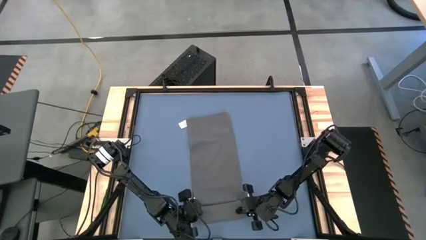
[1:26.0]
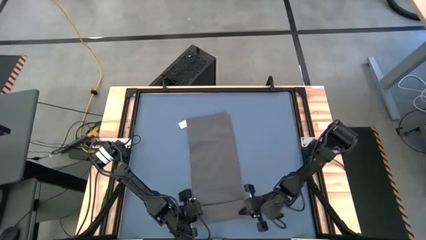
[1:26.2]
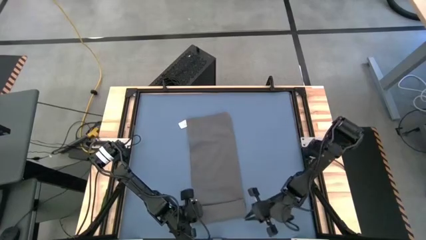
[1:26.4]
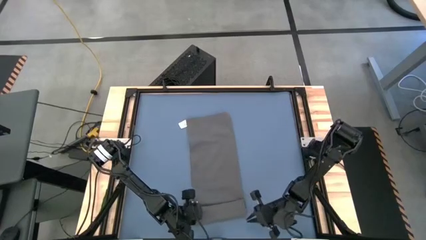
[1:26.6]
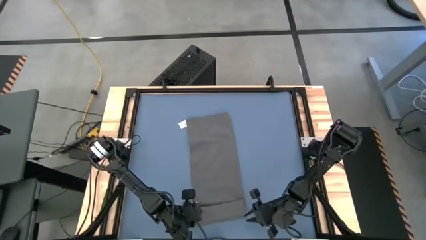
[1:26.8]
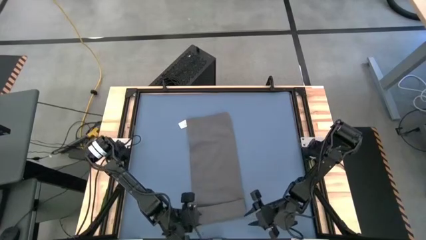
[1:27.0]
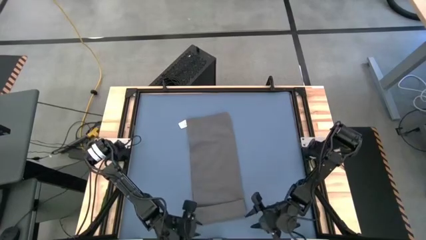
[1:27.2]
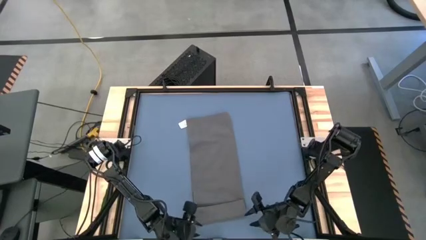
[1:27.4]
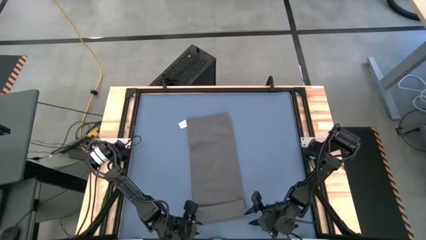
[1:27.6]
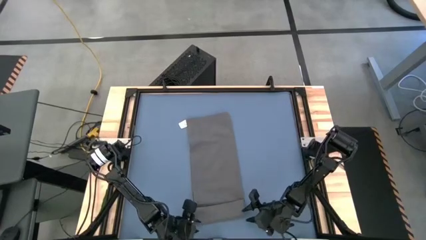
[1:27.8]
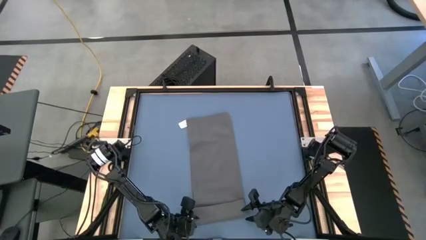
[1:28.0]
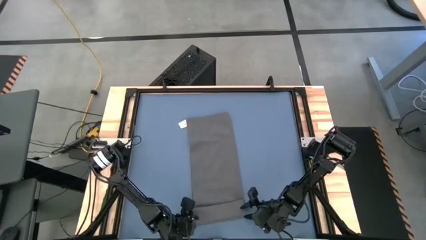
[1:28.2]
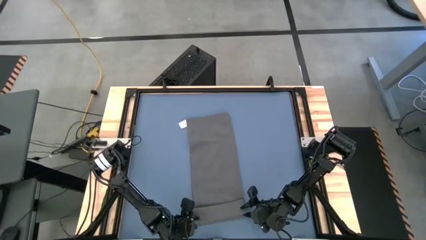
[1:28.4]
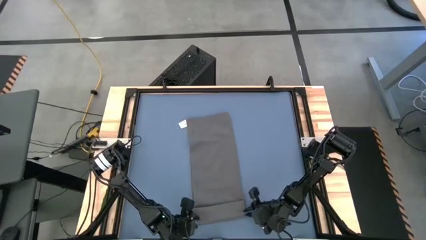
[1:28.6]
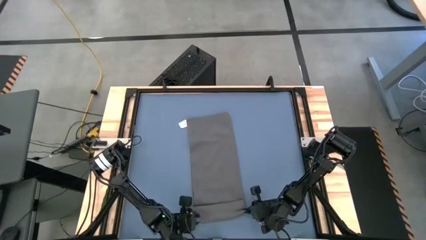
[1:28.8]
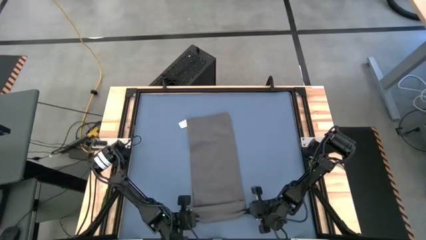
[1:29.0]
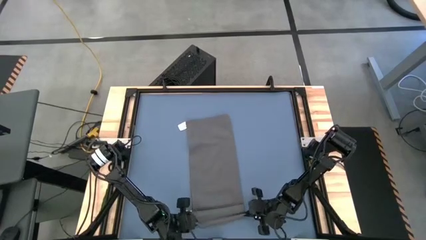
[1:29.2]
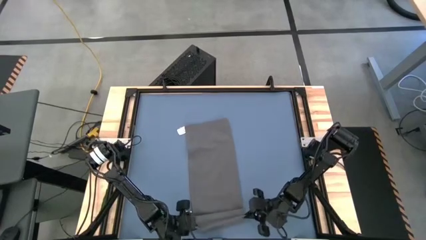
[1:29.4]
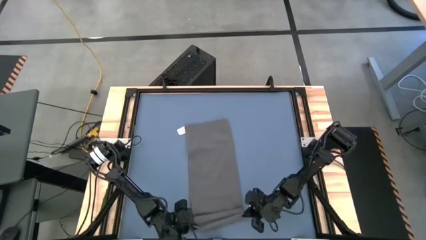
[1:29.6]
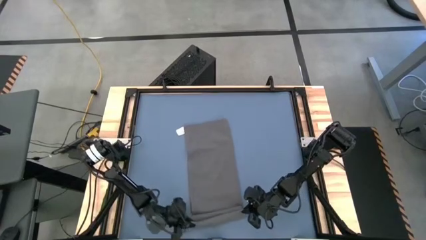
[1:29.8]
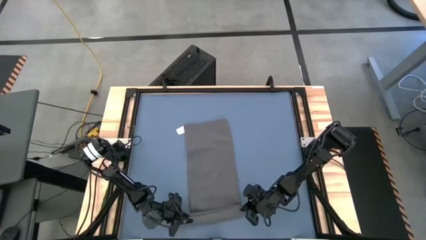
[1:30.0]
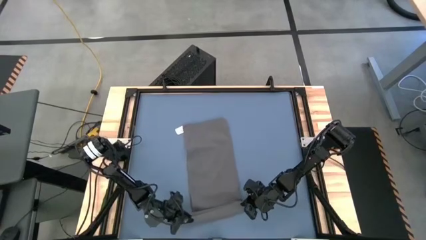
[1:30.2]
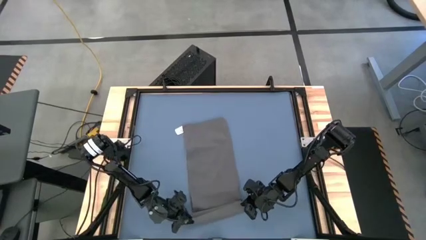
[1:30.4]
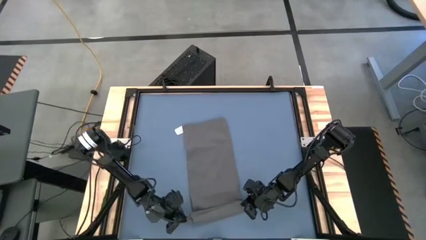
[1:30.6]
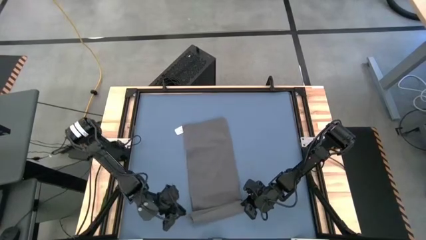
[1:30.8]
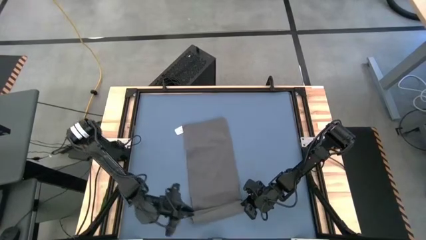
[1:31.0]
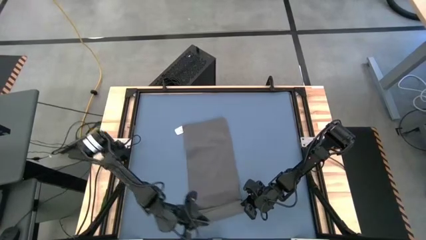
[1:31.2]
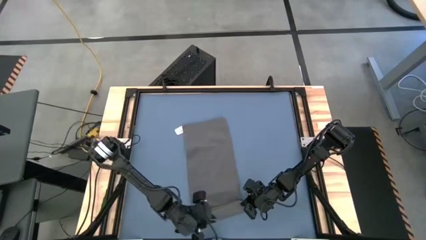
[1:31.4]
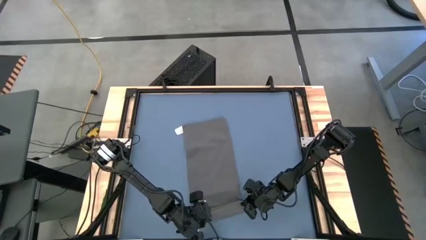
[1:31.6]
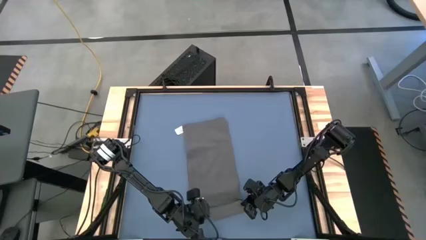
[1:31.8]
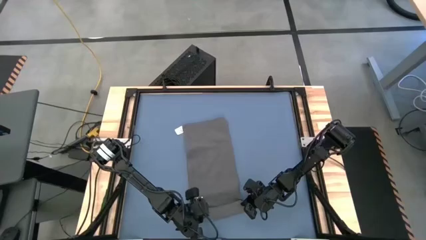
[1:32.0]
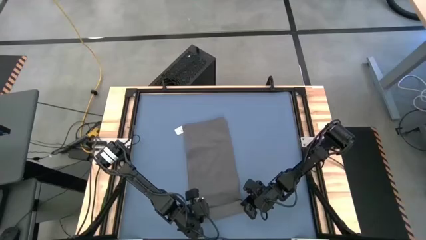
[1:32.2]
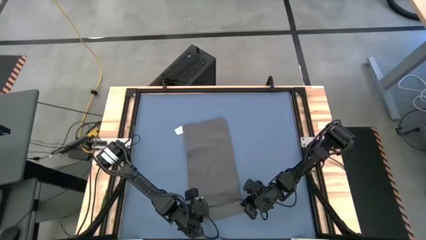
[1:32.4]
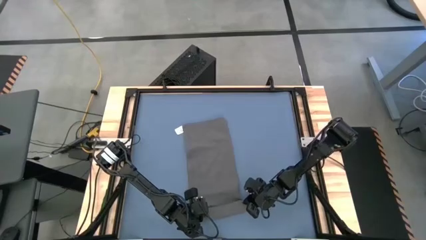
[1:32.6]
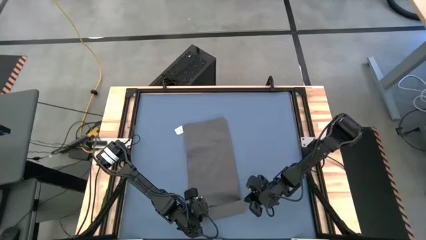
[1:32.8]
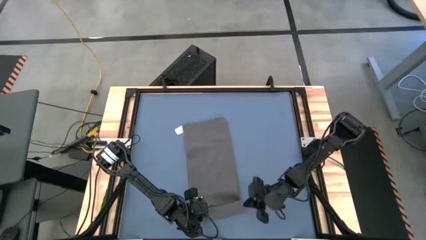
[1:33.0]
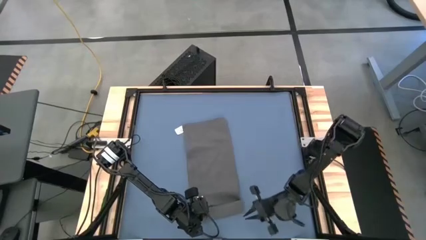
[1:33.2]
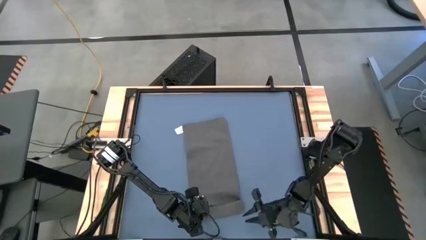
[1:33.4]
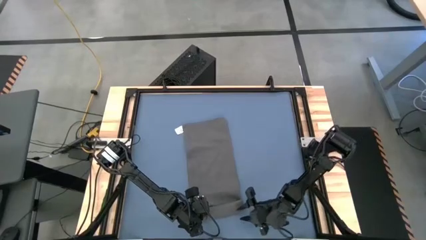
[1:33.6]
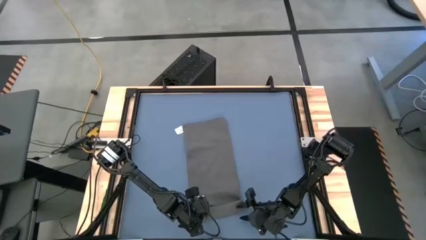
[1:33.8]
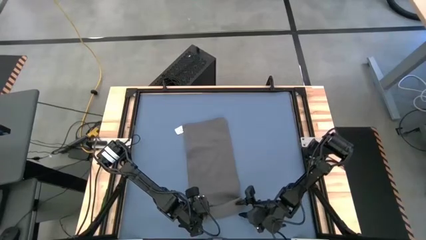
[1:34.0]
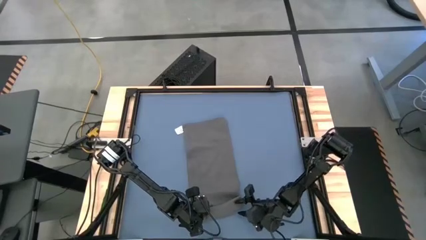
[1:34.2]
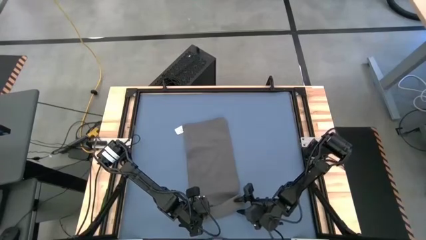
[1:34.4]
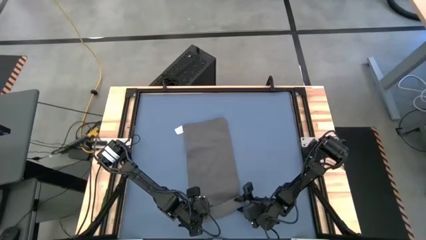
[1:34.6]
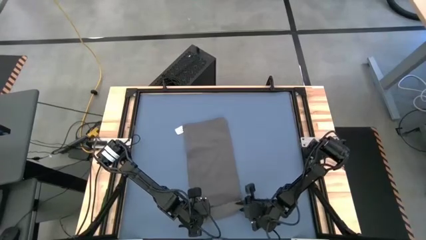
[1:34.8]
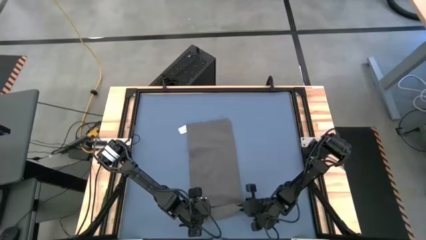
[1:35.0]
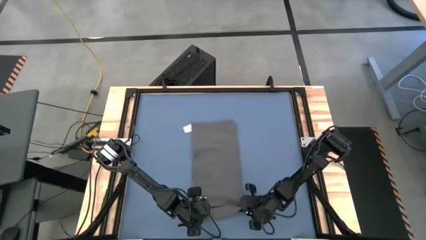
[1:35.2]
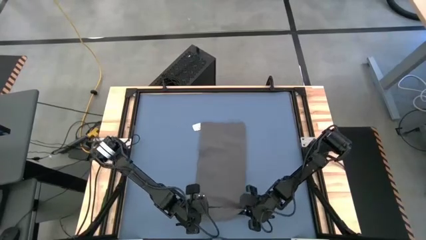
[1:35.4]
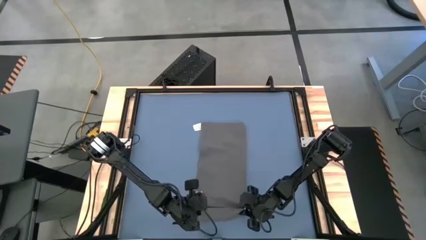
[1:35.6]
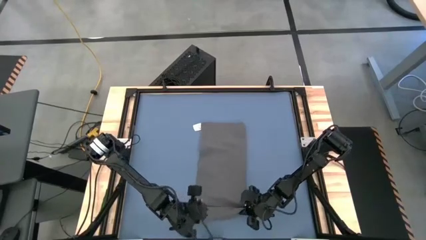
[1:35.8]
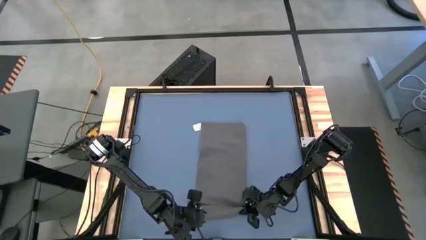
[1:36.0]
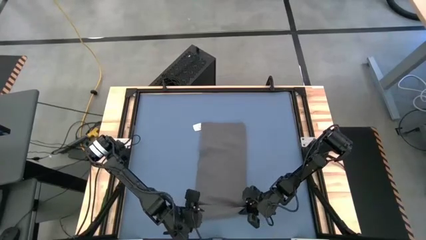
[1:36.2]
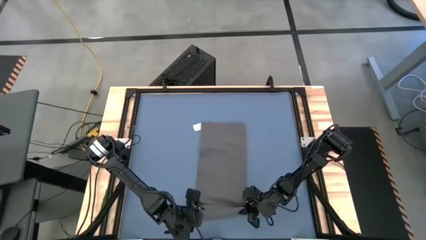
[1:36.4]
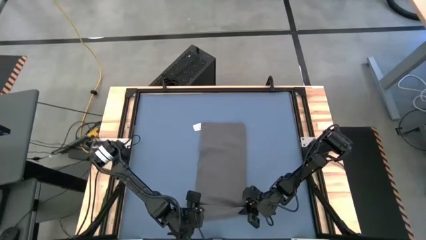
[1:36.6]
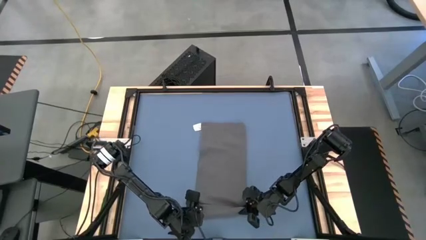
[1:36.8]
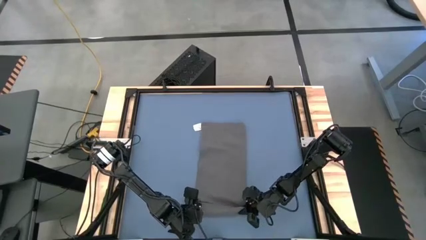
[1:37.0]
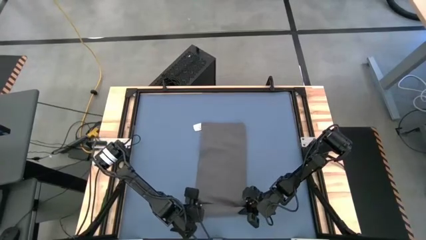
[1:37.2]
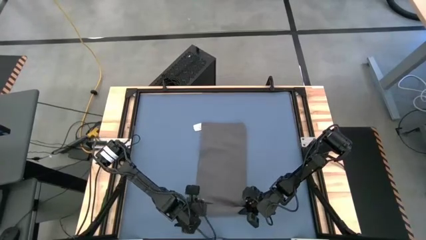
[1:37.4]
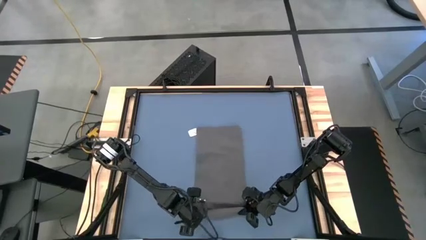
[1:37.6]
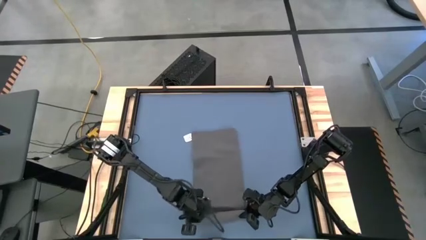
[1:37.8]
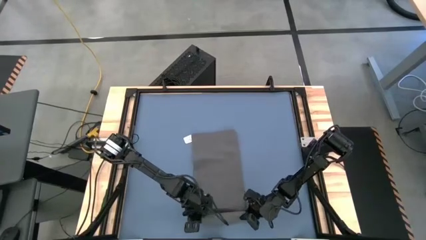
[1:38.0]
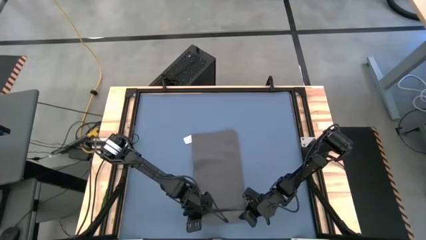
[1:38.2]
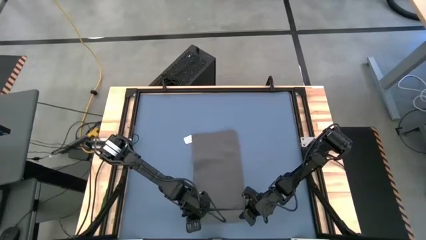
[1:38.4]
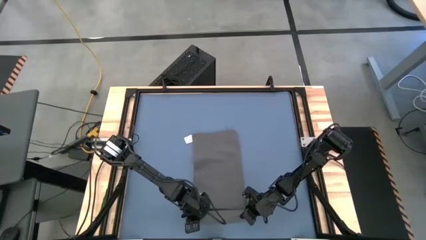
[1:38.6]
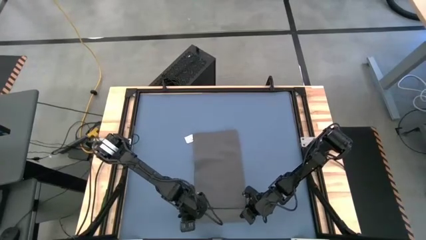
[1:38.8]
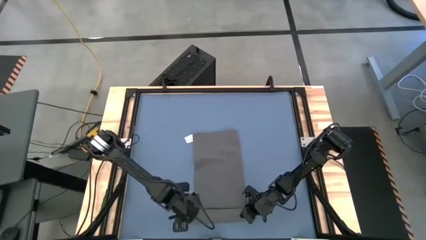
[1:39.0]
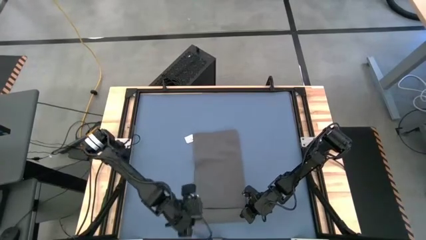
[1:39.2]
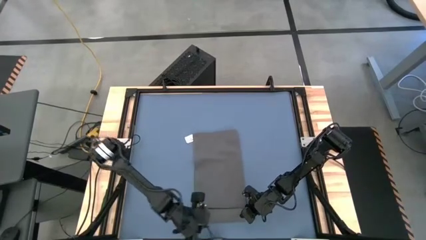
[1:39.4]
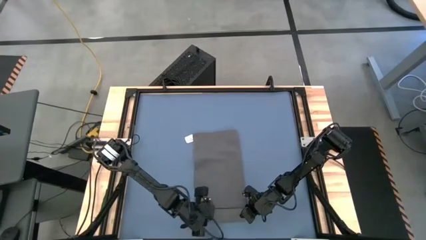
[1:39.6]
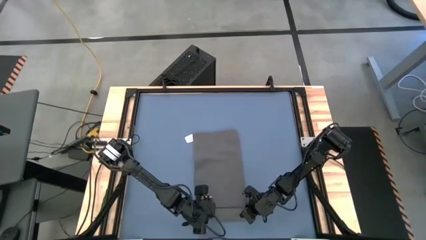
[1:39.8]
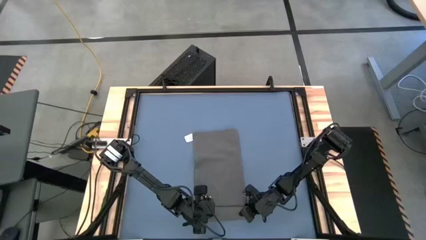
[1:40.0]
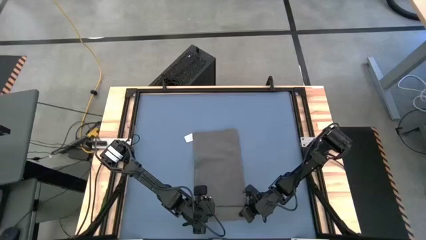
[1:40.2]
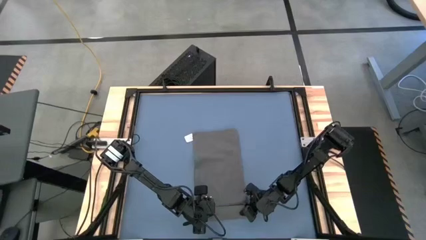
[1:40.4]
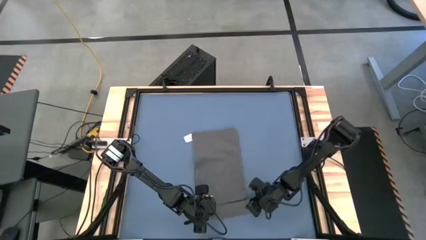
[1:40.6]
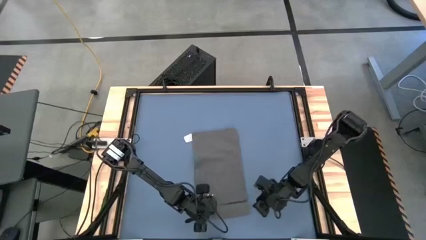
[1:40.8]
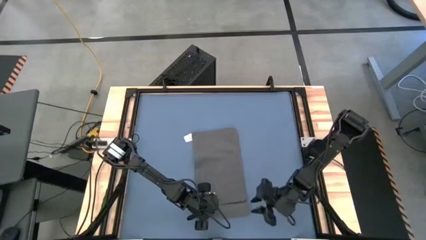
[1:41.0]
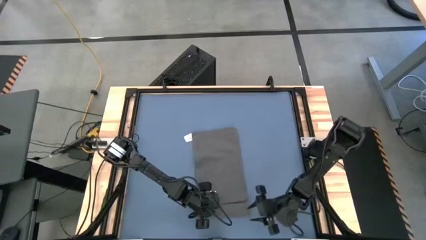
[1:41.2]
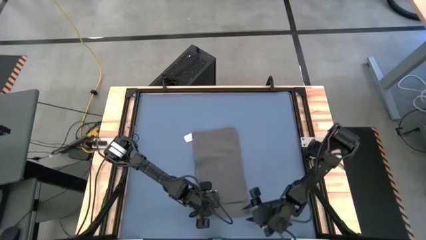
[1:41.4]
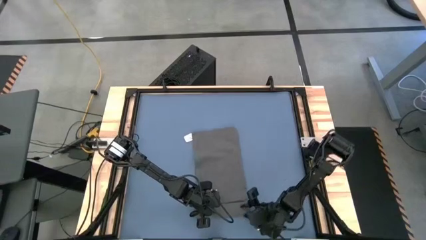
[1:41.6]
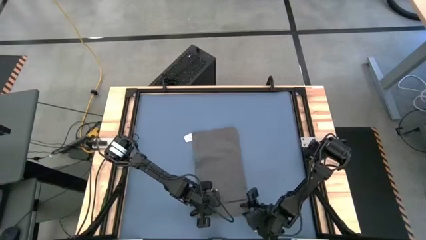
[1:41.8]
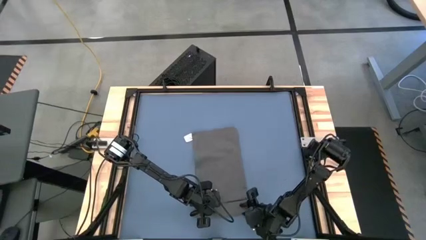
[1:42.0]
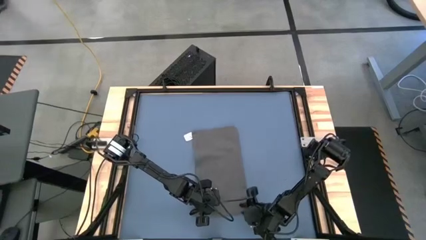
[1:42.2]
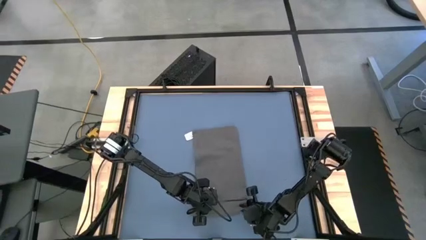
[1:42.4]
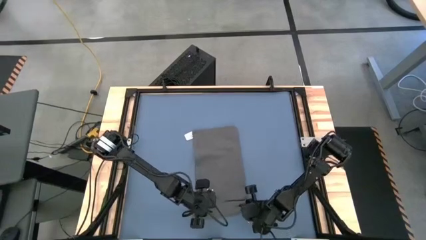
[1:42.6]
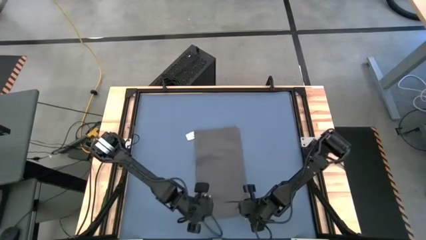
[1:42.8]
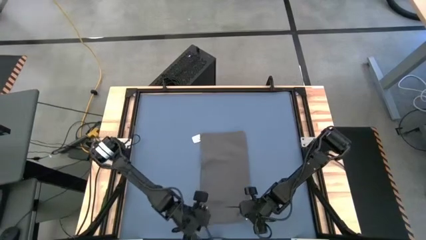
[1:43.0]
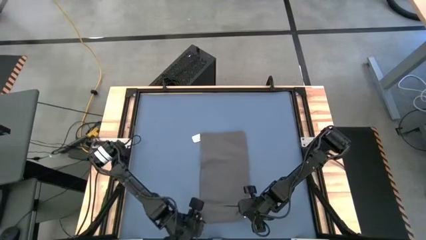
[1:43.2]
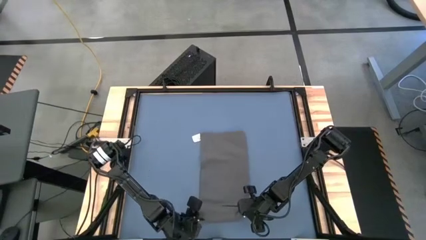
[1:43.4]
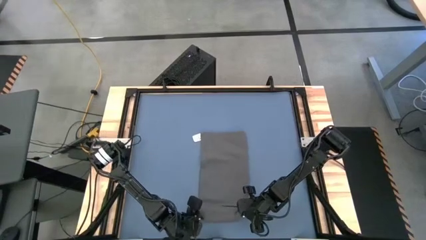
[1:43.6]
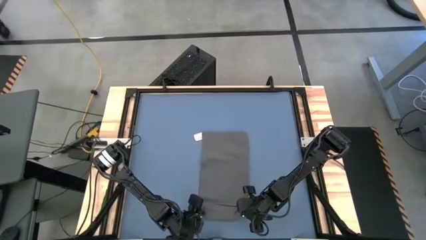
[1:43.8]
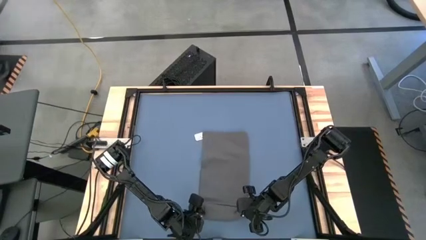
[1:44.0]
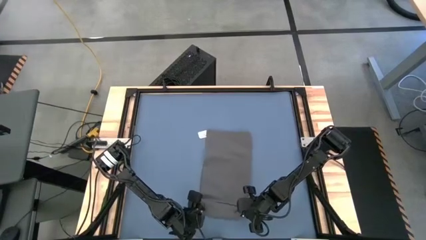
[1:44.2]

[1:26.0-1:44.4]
Task: Roll towel into tight, uniform cylinder
Roll the gray towel
